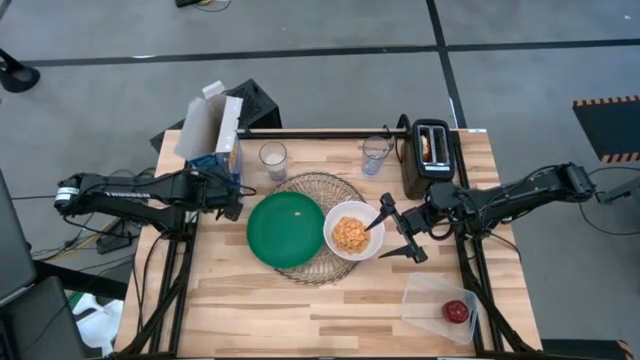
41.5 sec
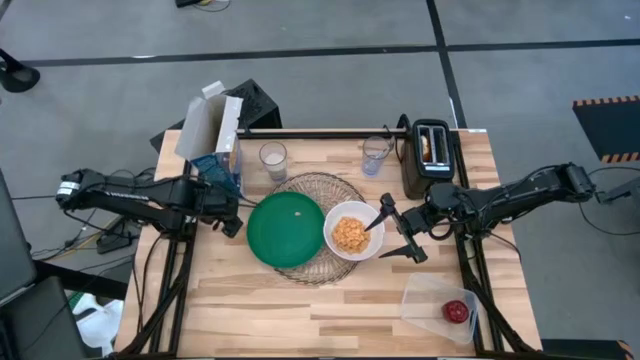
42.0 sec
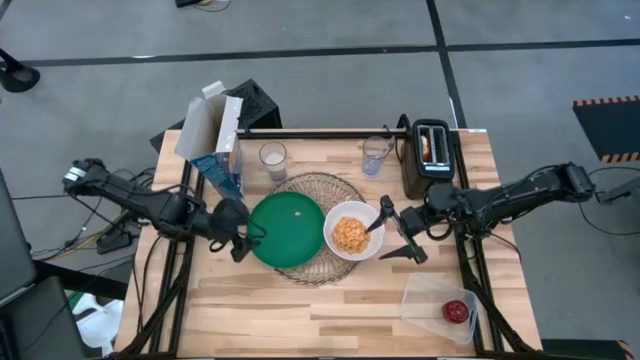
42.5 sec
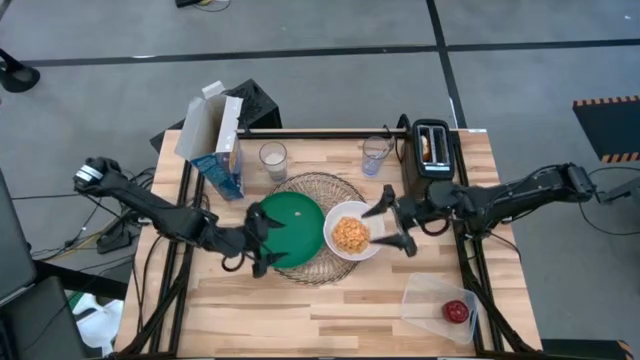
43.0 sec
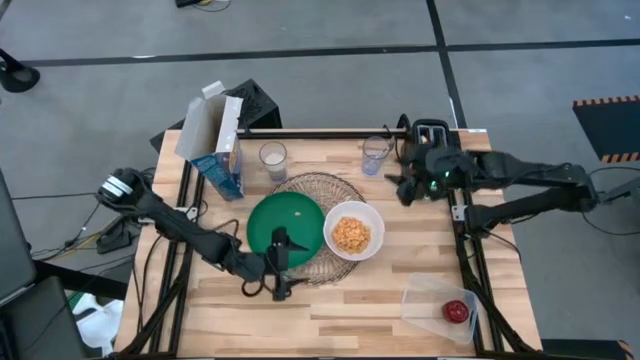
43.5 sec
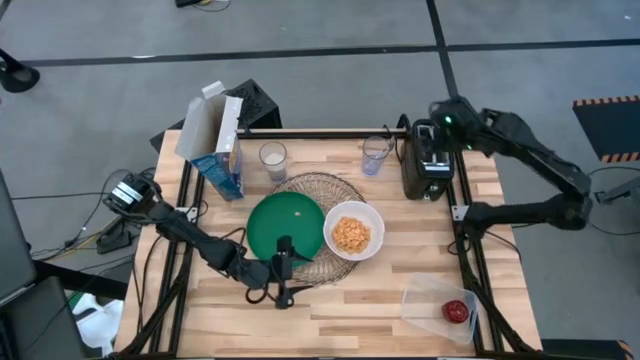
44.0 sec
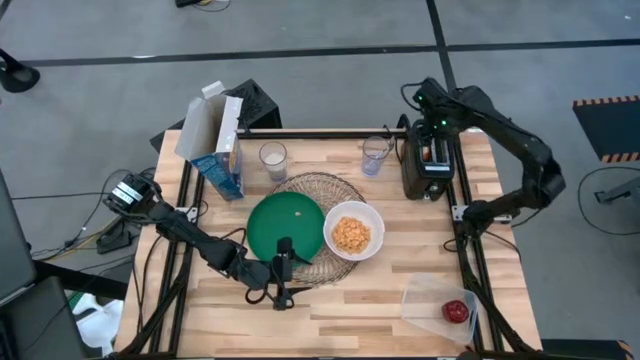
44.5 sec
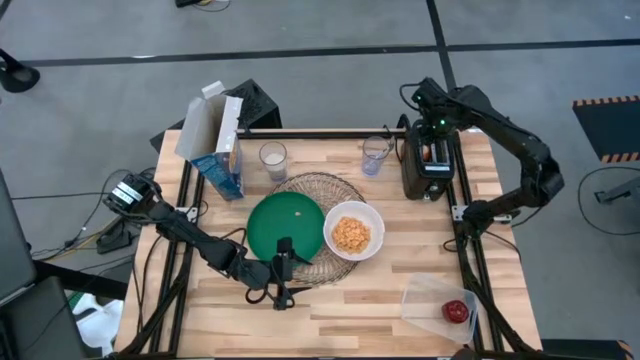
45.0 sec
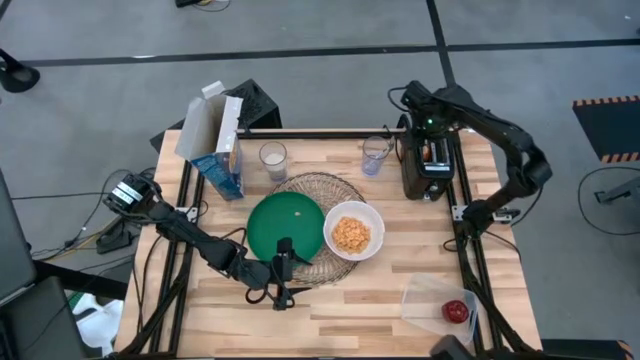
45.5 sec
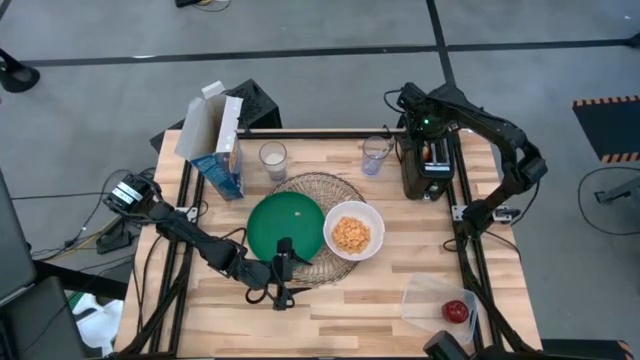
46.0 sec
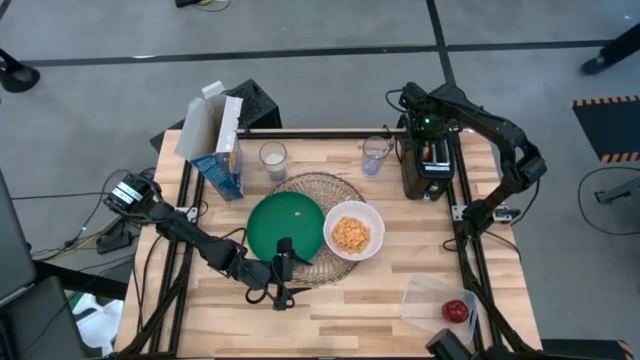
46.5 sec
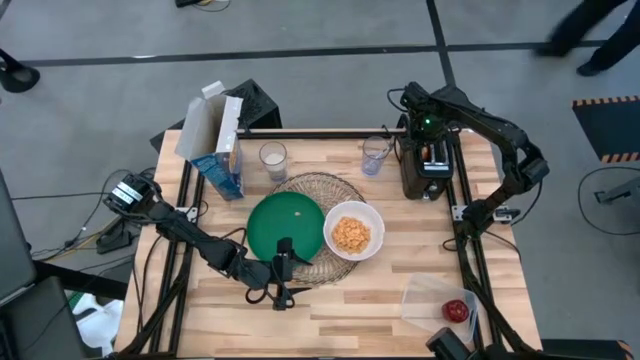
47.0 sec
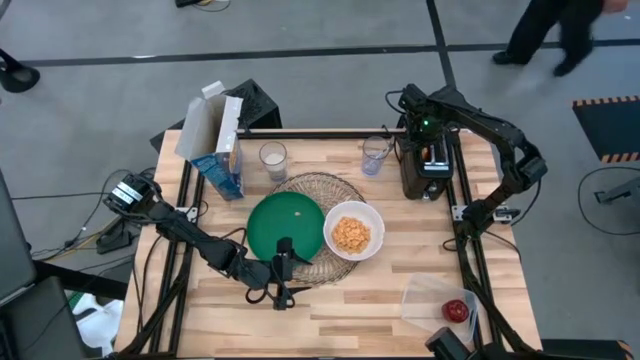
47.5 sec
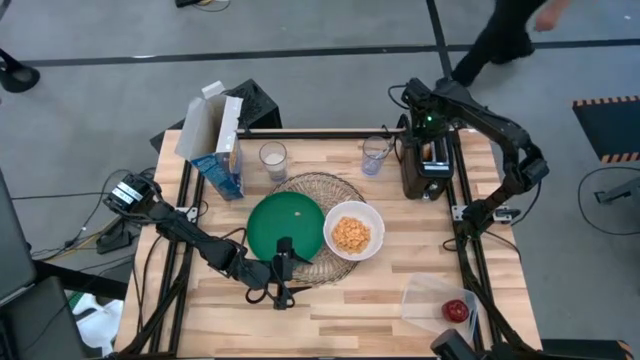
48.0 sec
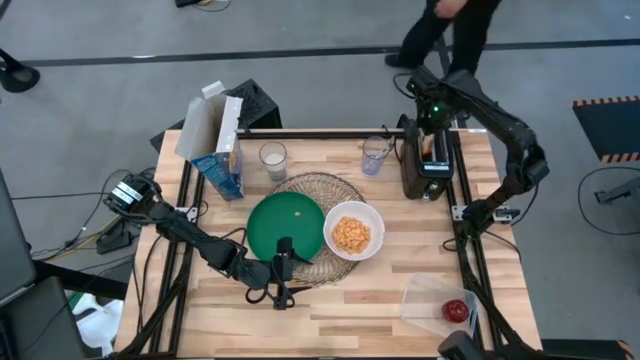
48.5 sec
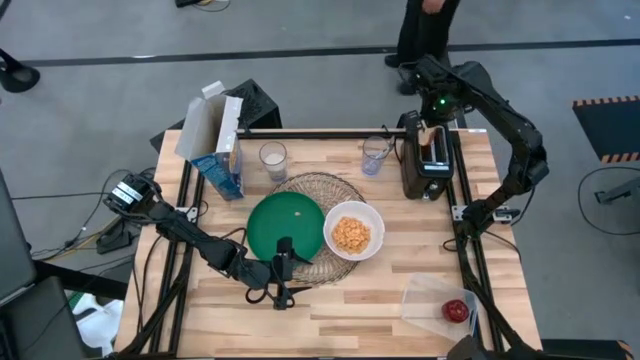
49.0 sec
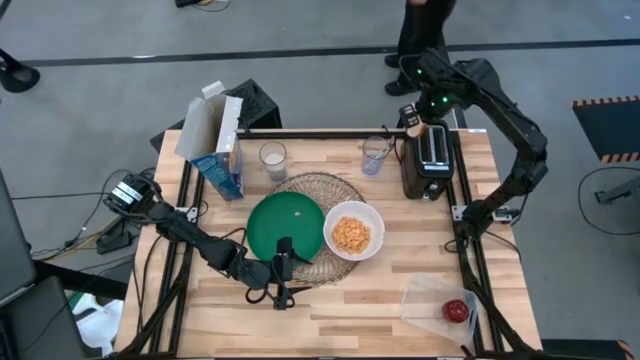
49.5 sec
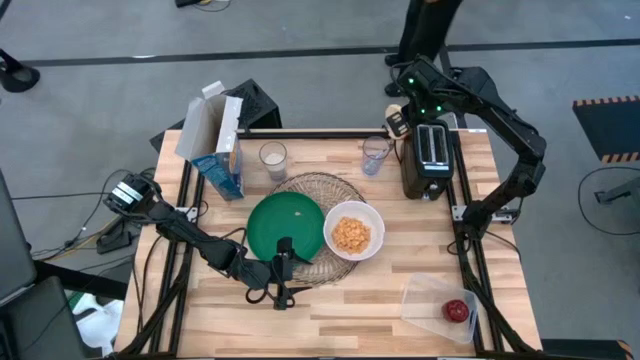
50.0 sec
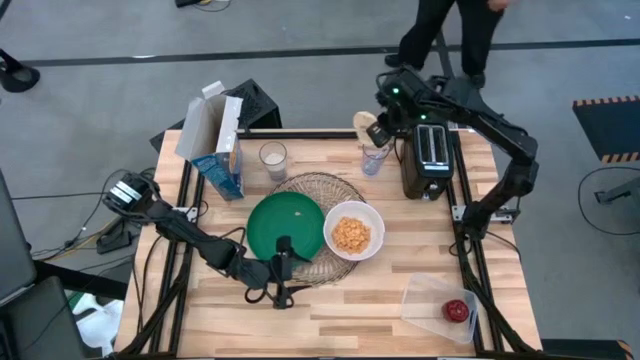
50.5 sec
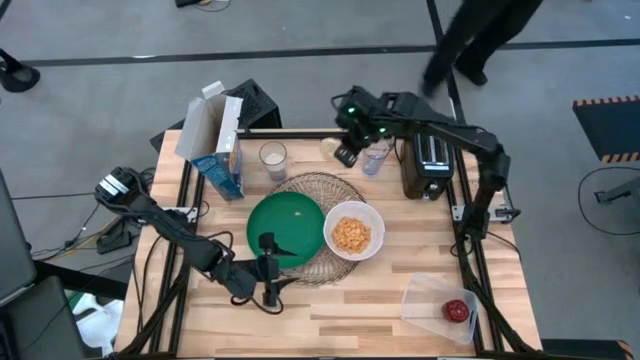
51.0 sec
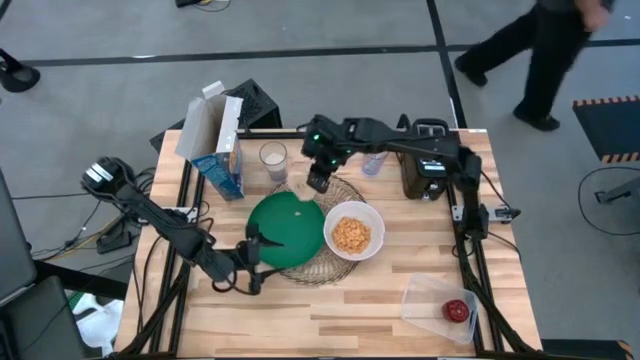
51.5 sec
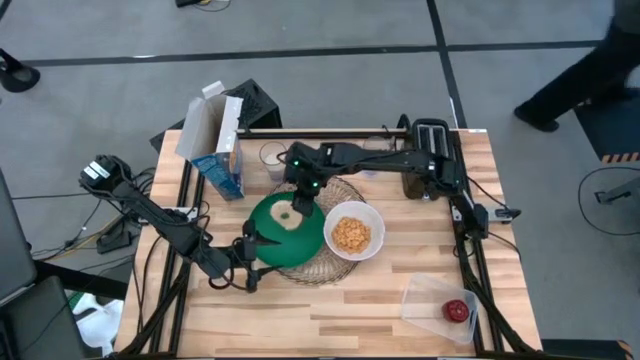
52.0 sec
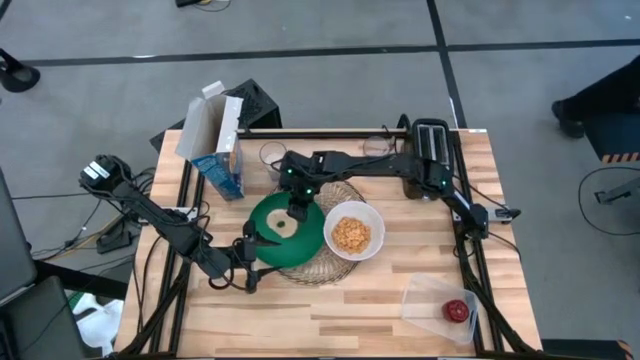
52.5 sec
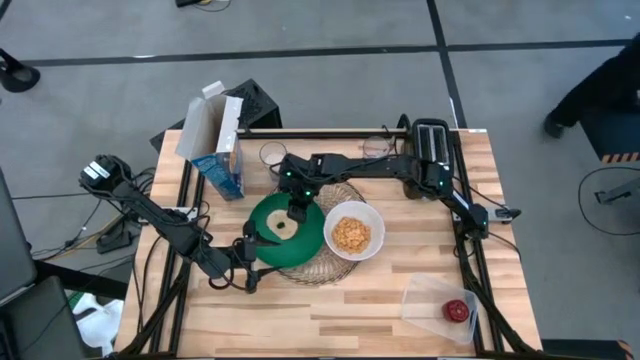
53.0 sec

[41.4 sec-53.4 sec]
Task: Arrange a breakfast setting
Put the bagel on the green plate

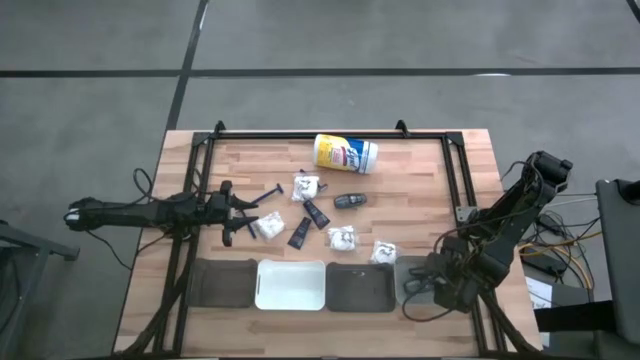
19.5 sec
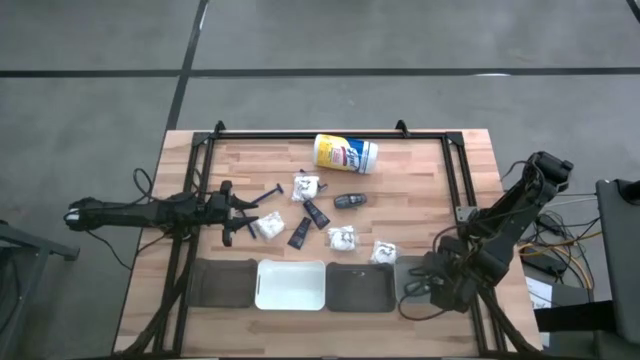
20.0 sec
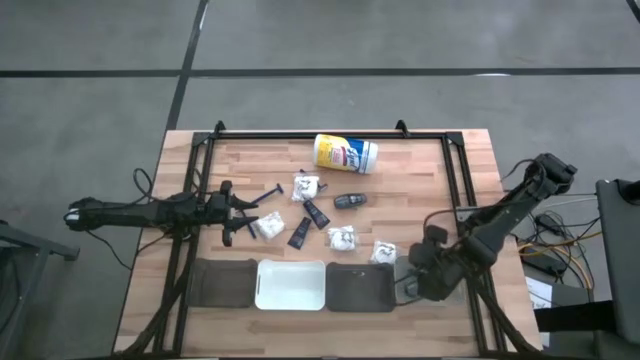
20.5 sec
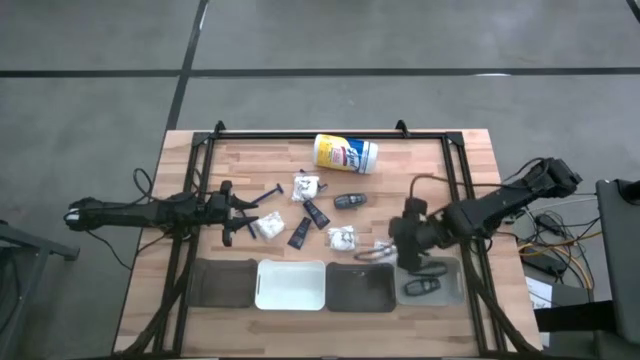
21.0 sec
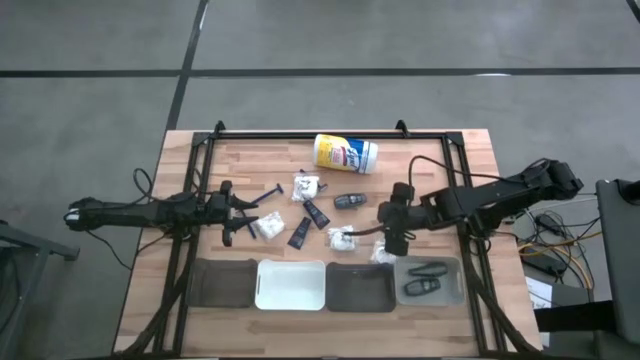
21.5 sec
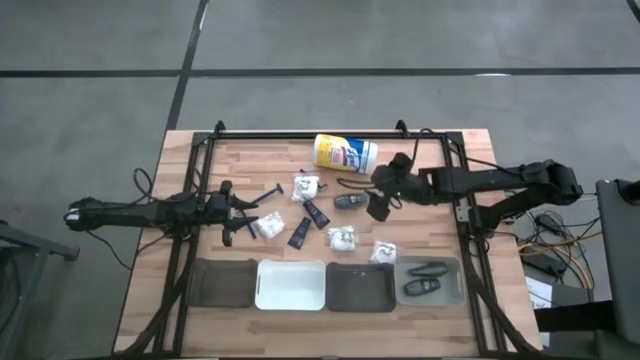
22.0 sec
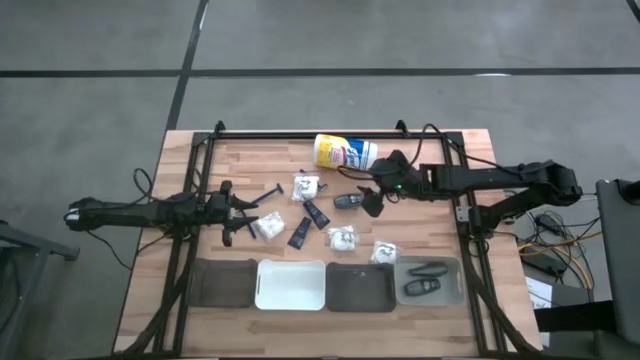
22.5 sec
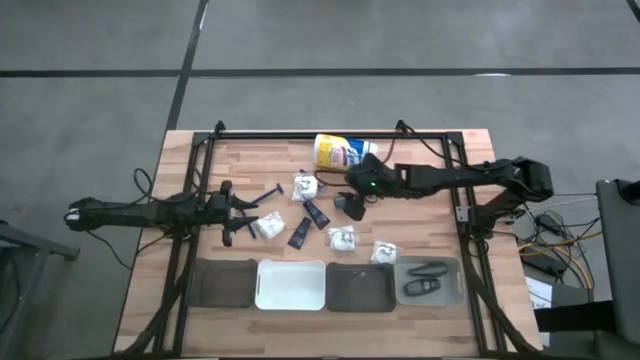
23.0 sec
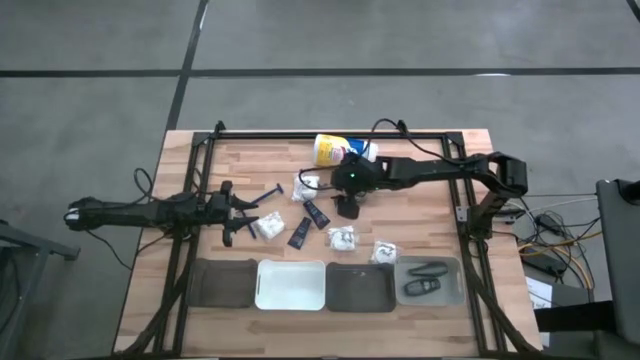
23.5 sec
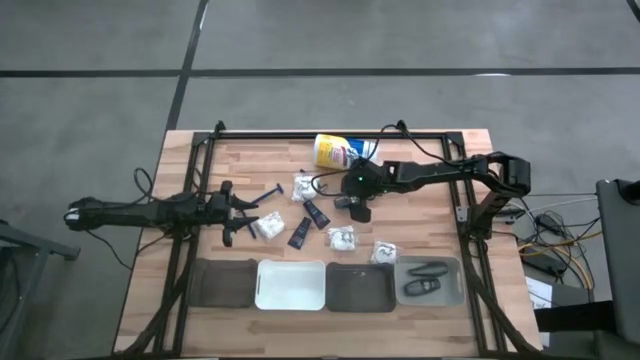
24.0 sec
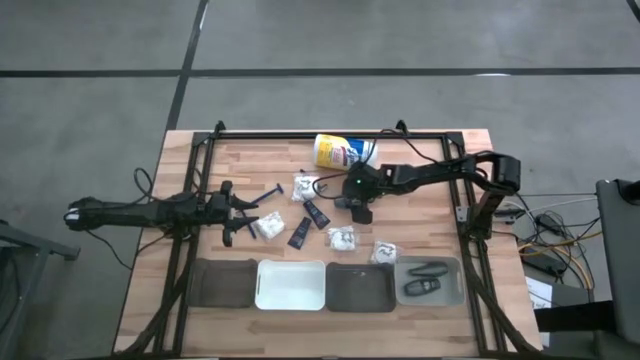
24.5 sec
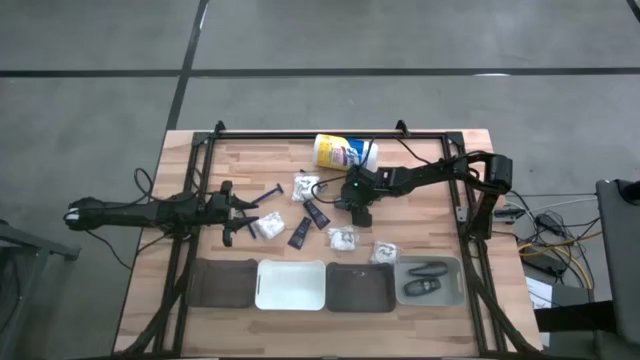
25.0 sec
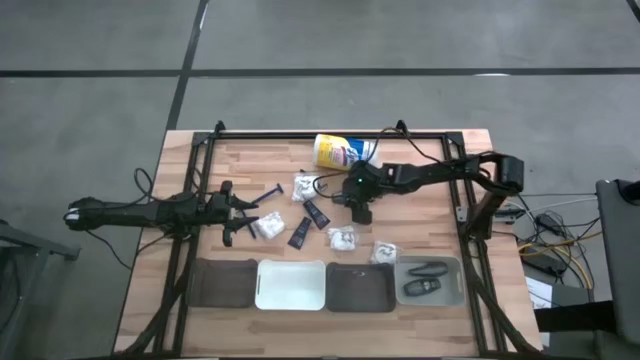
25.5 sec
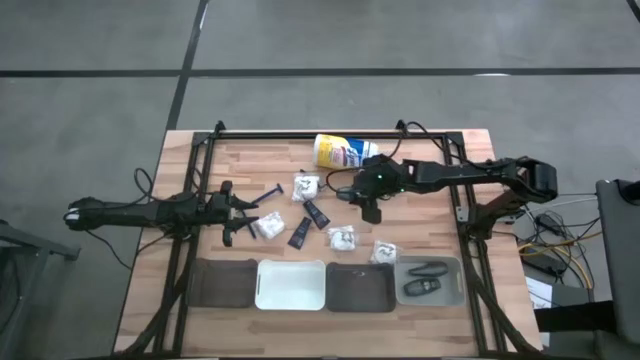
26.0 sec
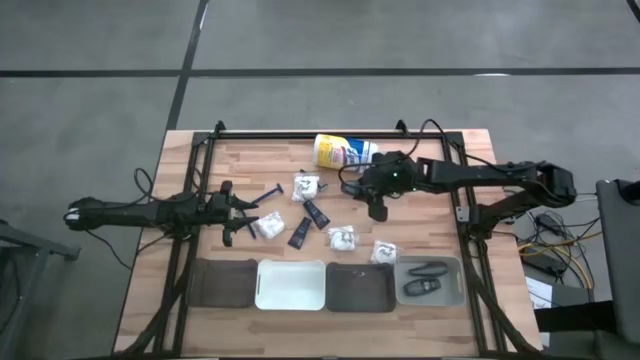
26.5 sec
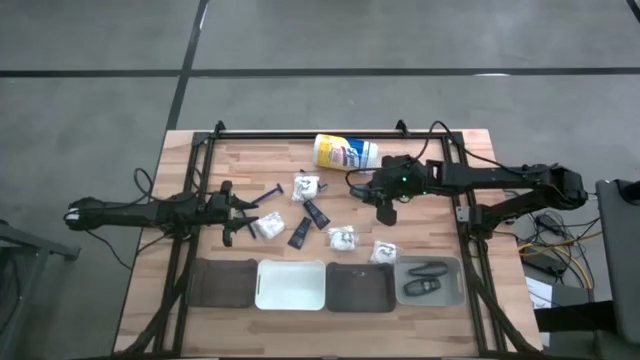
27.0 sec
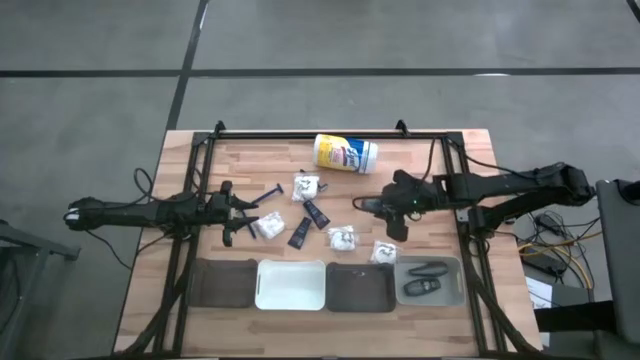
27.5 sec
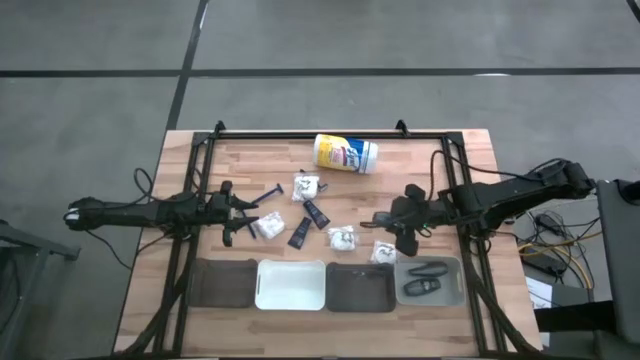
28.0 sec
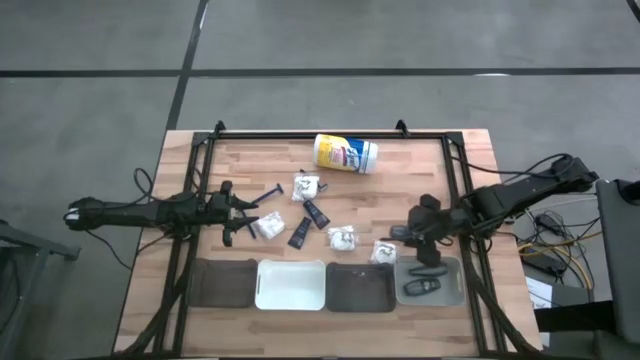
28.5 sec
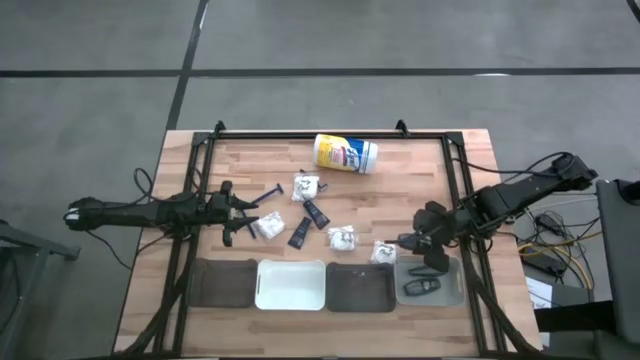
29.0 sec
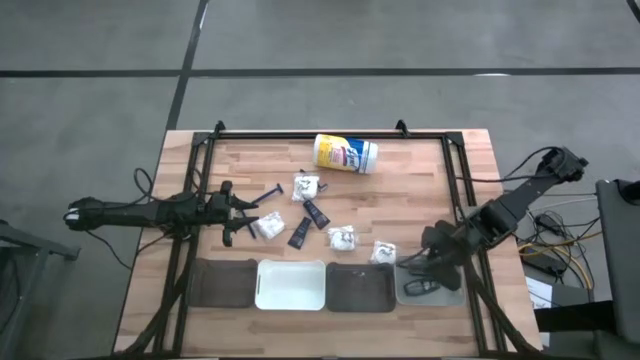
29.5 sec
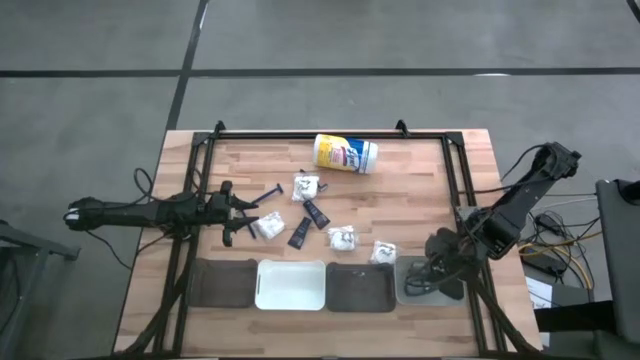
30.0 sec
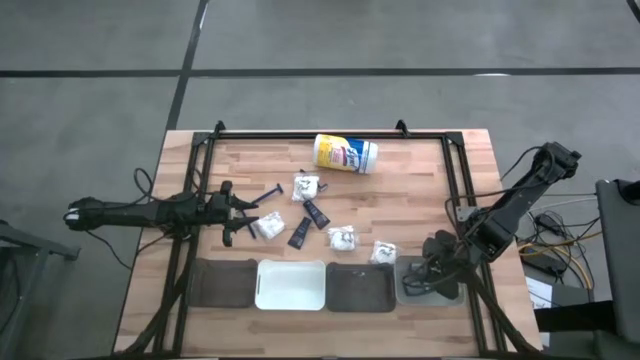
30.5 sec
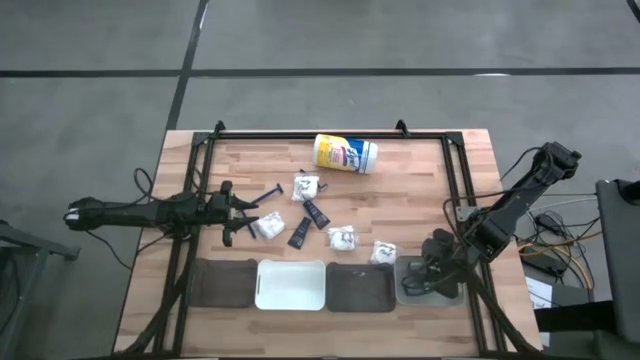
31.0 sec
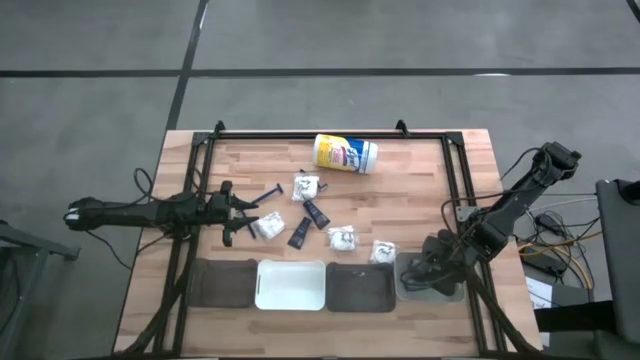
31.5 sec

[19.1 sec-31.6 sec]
Task: Pick & Place Travel size toiletries
Put the gray deodorant into the gray bin
